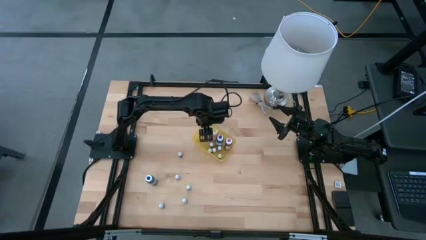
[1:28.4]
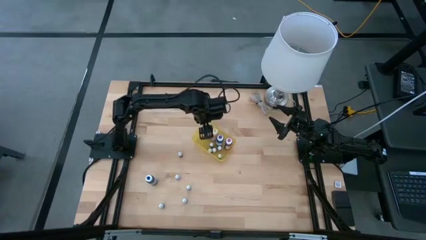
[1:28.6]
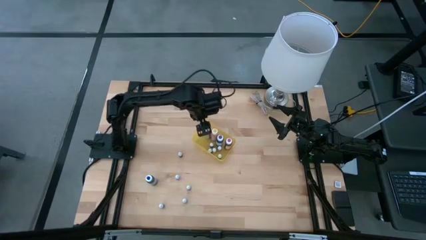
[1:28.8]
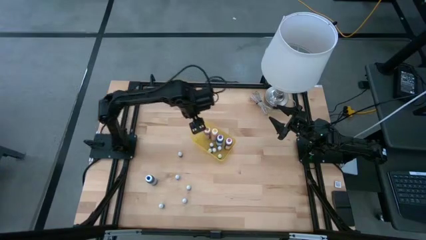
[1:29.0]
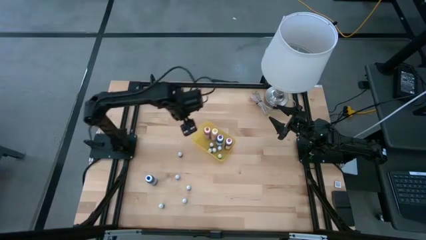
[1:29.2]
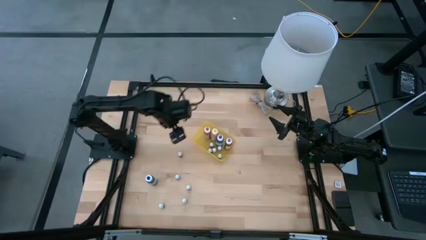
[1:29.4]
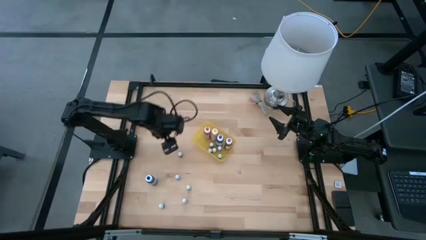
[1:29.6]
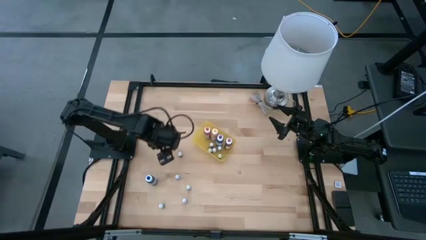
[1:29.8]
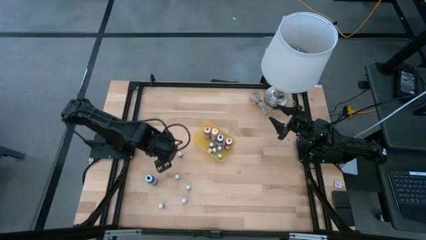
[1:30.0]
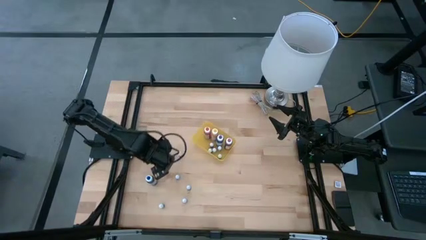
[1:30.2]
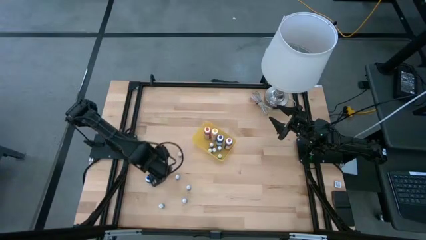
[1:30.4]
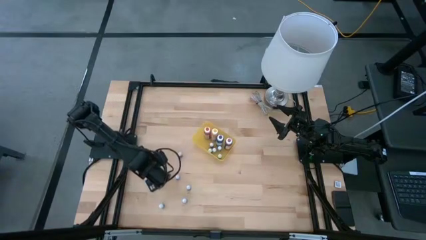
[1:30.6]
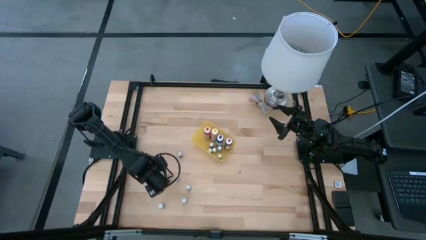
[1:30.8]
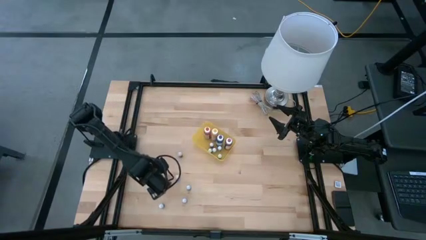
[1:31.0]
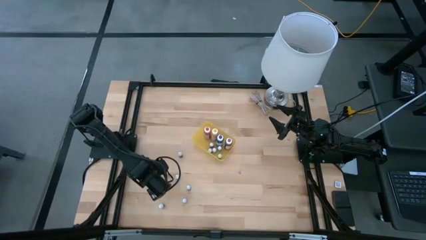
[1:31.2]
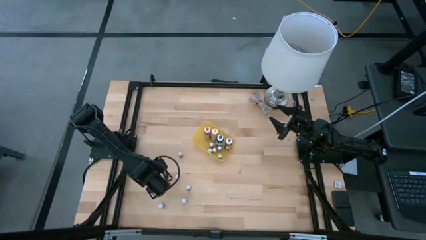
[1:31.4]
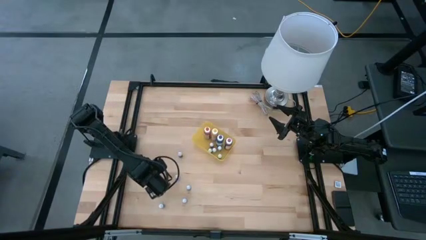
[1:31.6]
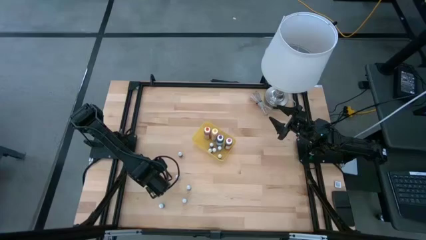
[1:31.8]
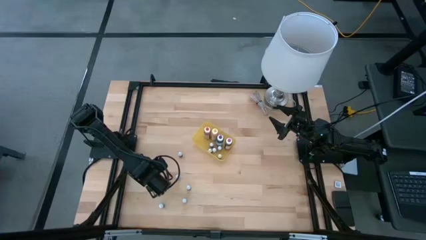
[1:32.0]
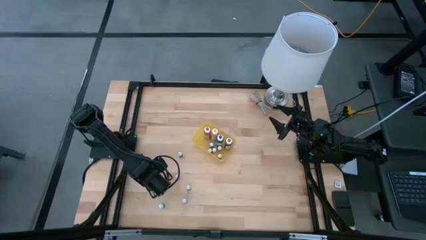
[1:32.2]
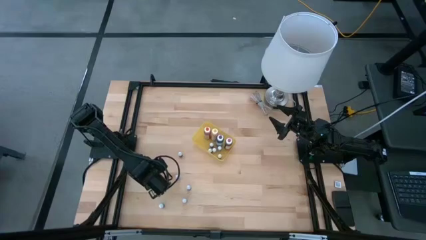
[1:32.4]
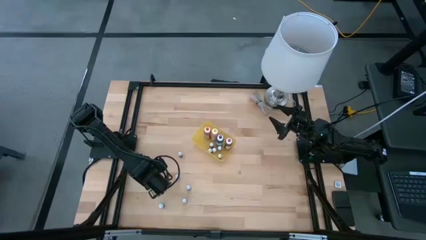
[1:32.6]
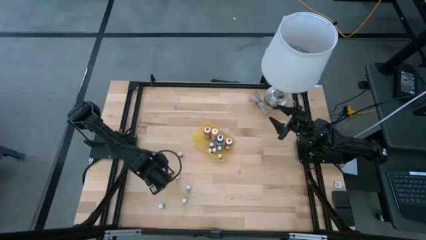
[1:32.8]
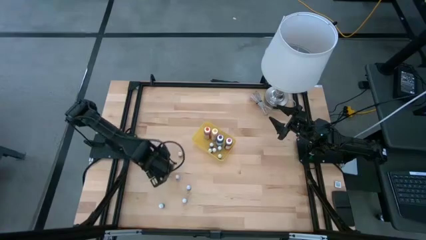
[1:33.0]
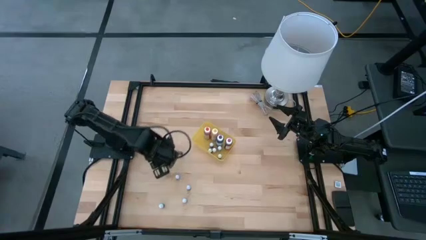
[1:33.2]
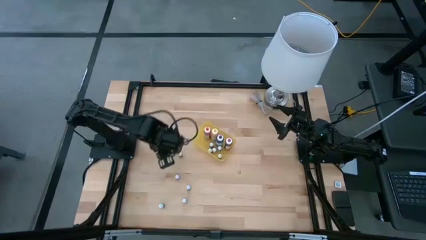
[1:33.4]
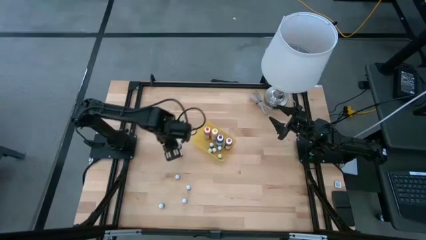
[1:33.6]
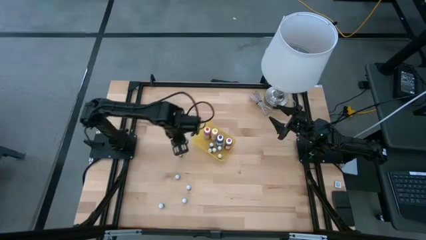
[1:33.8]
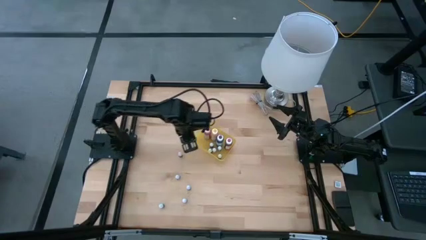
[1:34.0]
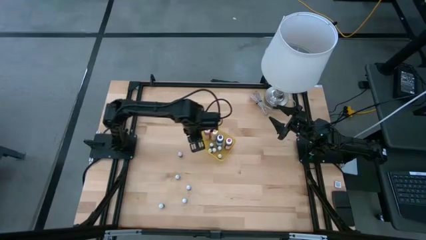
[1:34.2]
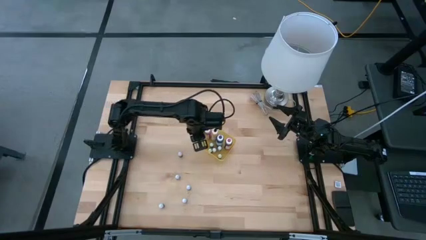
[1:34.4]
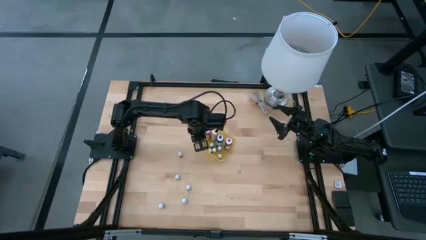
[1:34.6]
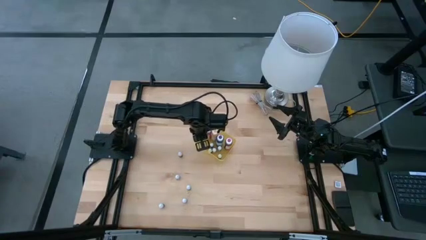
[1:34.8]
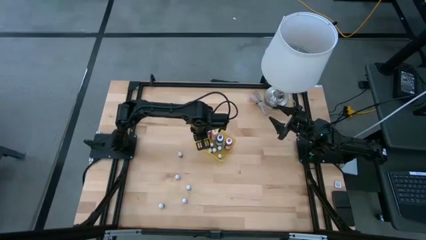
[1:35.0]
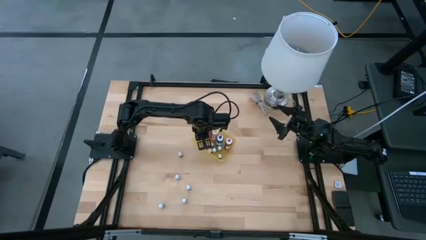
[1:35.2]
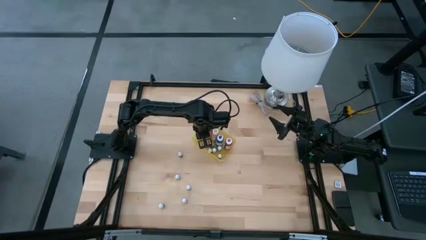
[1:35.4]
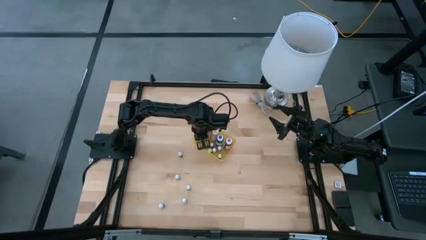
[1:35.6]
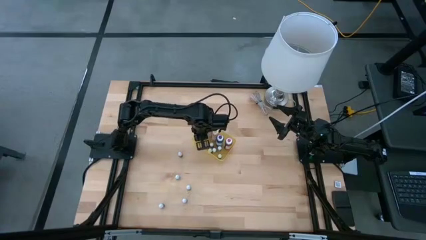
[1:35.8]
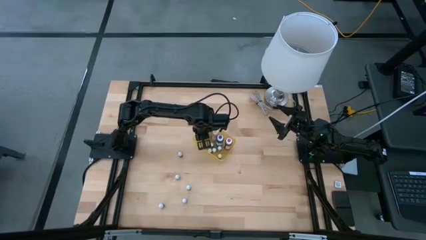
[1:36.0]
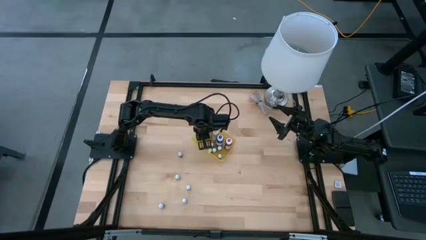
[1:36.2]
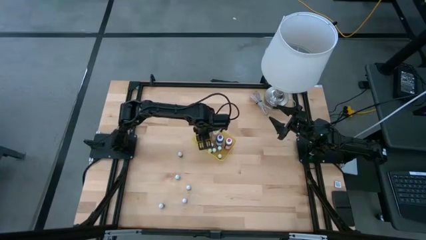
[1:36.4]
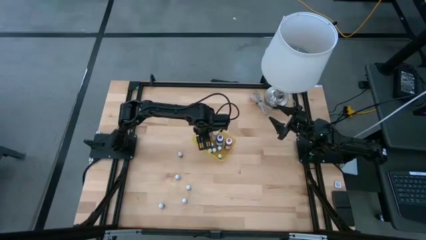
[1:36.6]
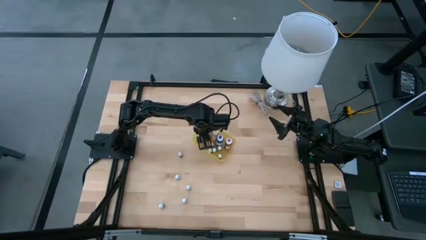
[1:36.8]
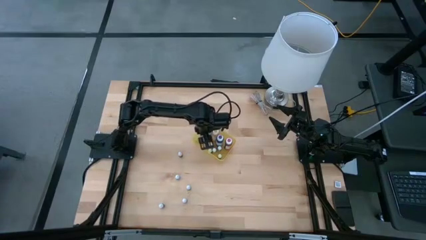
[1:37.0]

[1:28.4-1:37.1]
Task: Pick & Place food coloring
Put the large blue food coloring bottle into the yellow bin

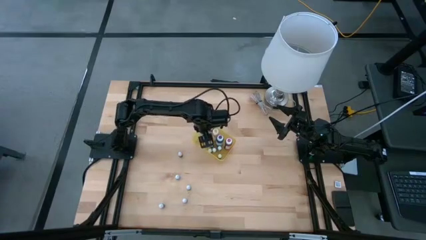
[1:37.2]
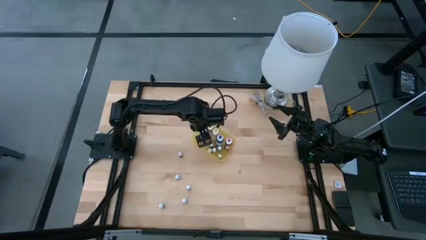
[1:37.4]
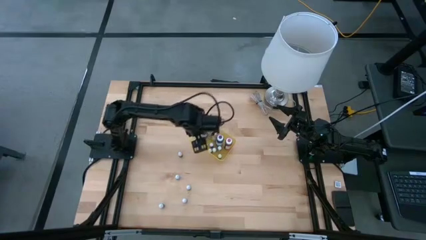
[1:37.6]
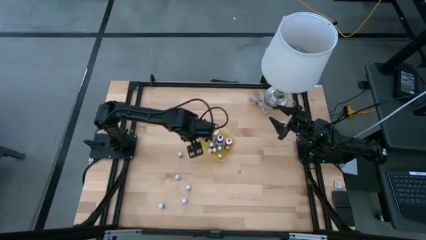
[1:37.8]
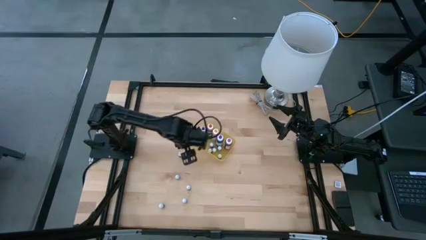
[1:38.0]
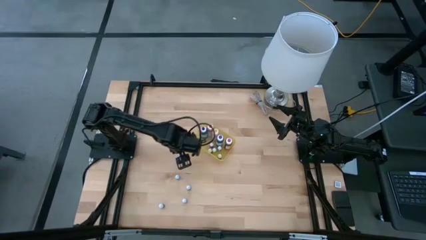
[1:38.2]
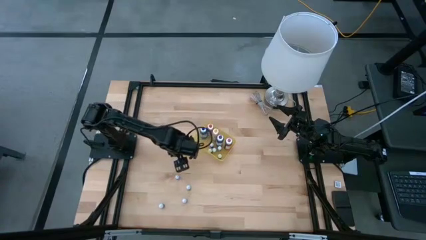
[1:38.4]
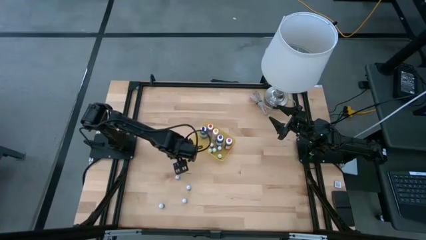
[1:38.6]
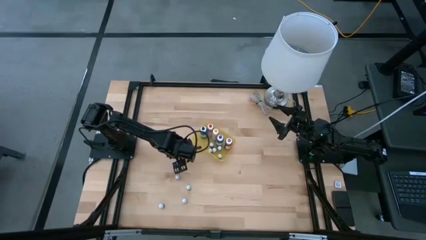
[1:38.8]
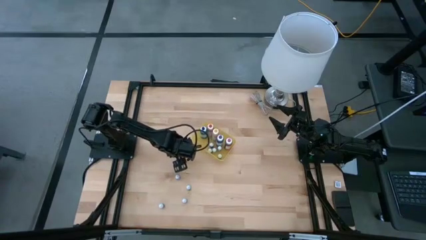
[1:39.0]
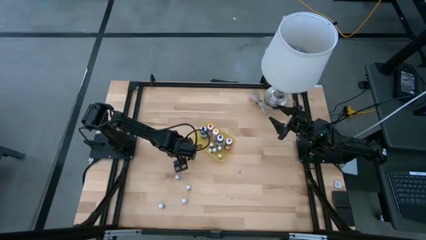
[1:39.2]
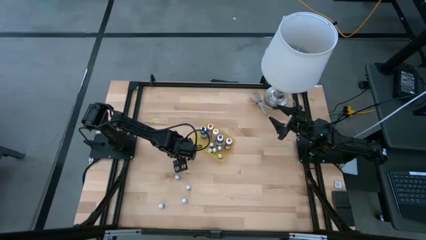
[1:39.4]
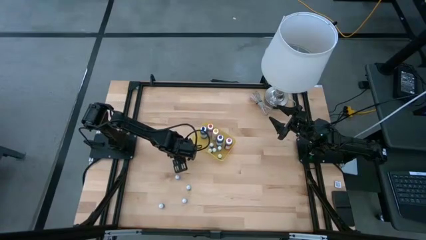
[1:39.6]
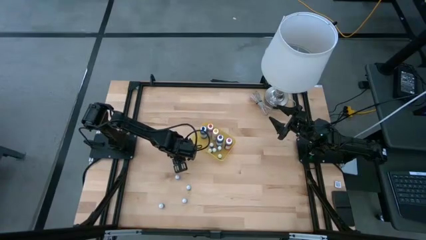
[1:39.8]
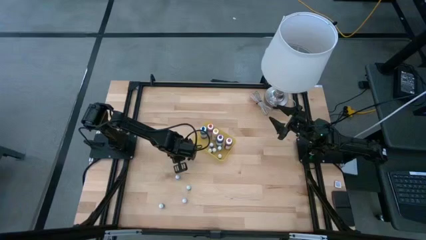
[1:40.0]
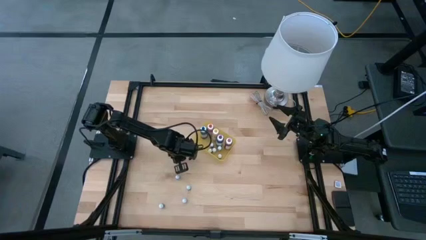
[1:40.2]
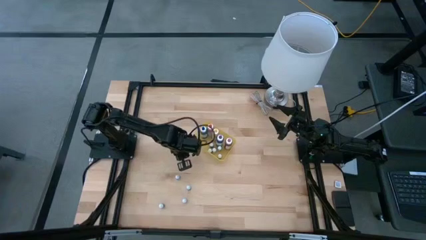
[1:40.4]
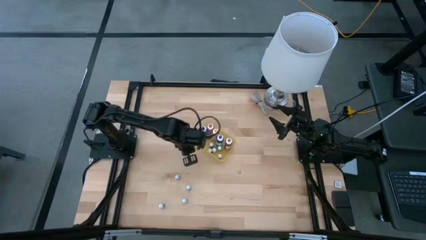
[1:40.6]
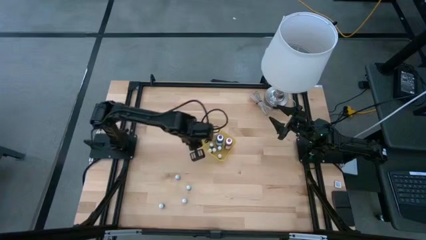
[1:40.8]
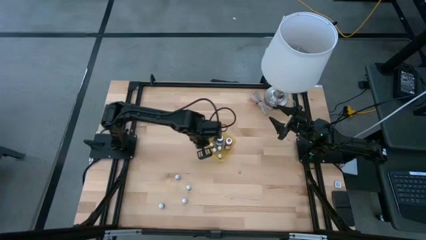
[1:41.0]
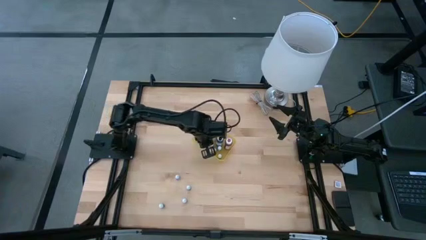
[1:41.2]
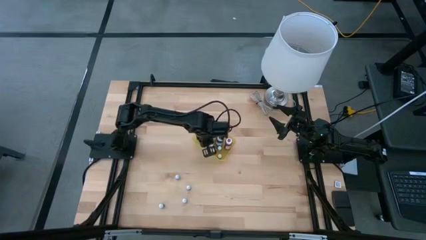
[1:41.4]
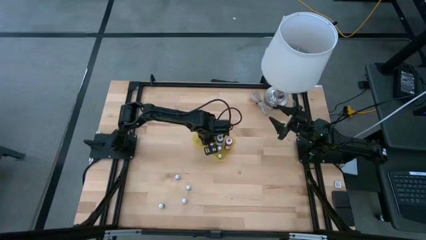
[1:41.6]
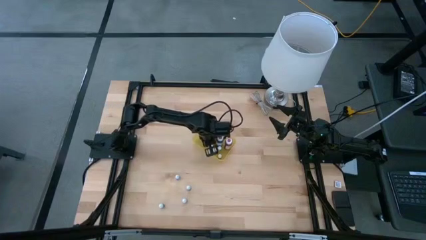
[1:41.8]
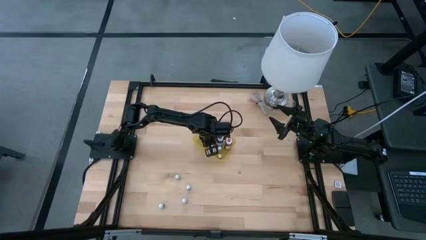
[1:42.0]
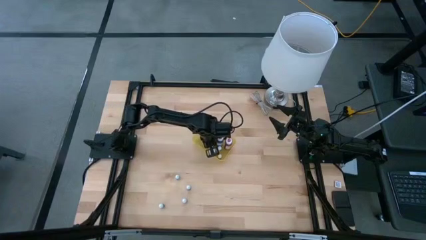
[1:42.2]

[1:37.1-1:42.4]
Put the small red food coloring bottle into the yellow bin
